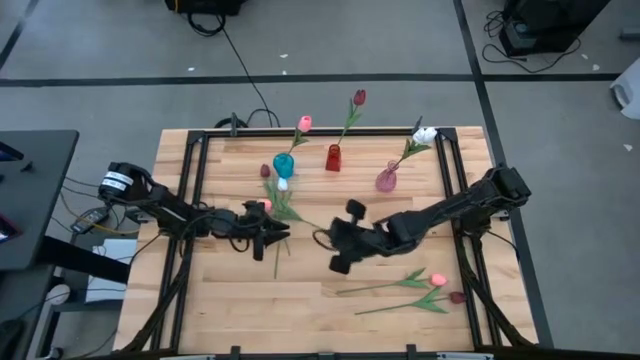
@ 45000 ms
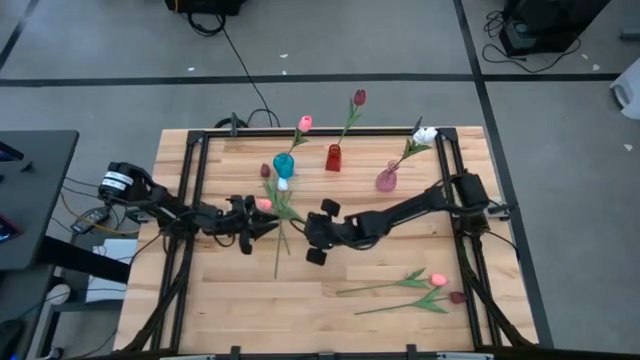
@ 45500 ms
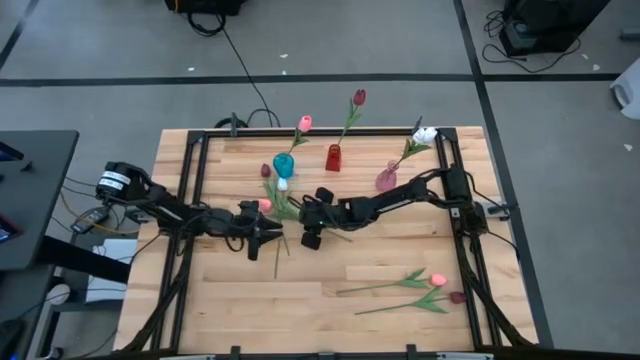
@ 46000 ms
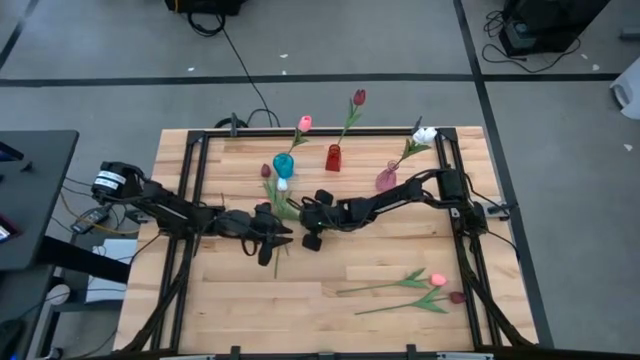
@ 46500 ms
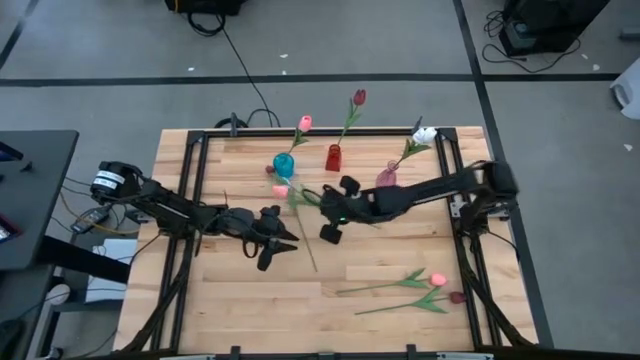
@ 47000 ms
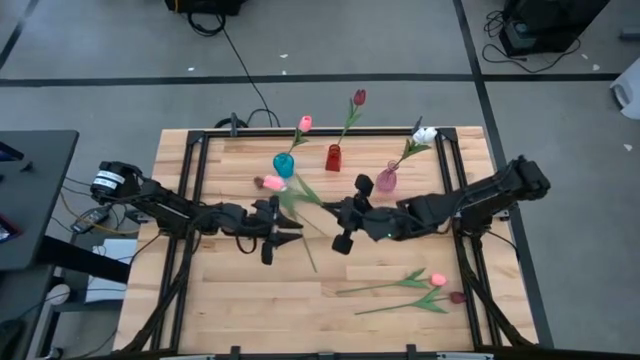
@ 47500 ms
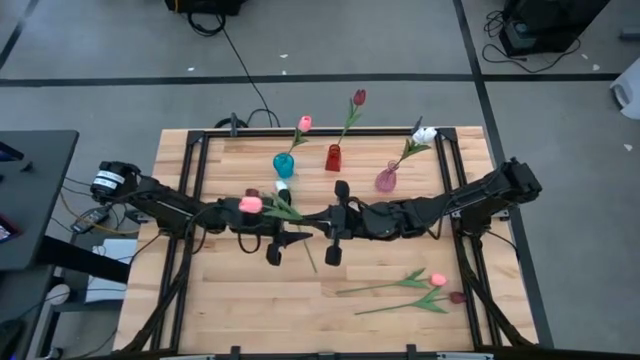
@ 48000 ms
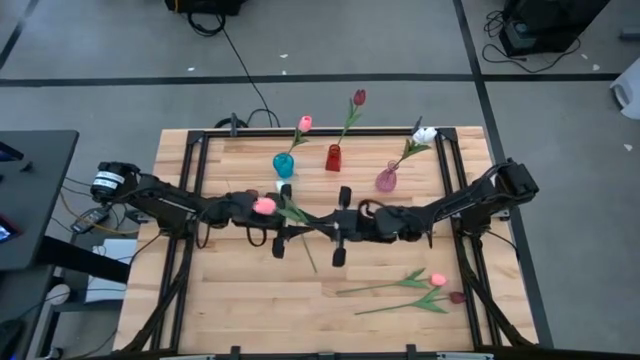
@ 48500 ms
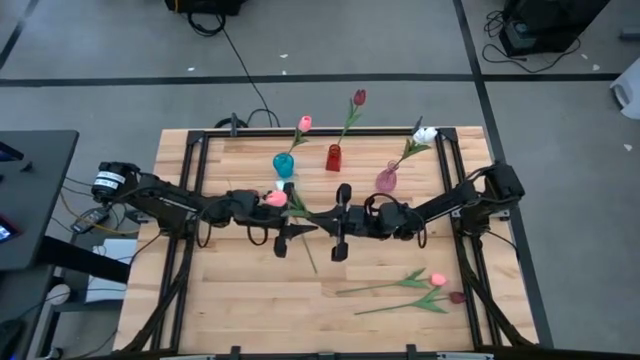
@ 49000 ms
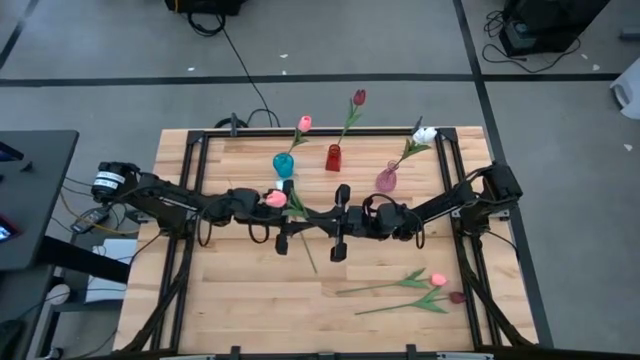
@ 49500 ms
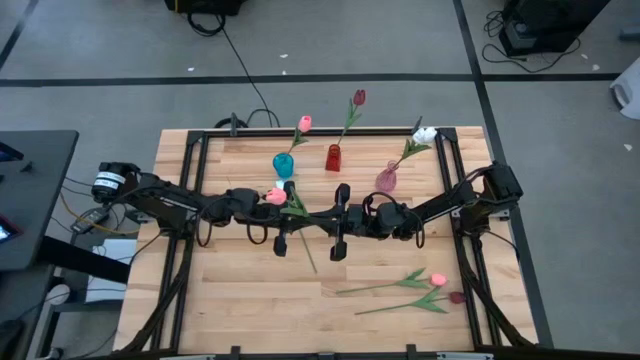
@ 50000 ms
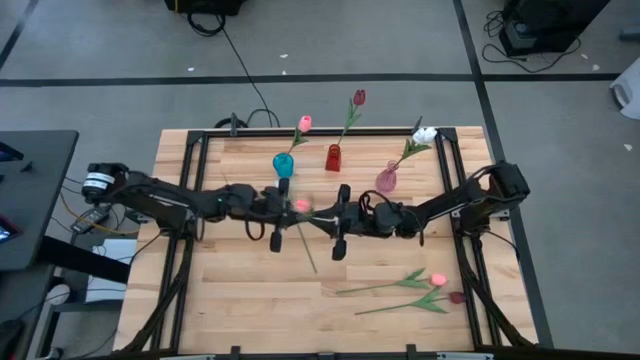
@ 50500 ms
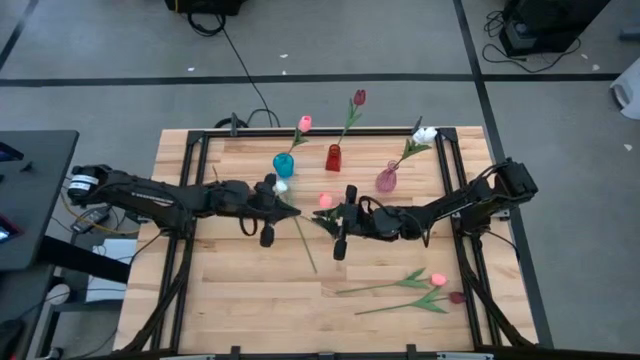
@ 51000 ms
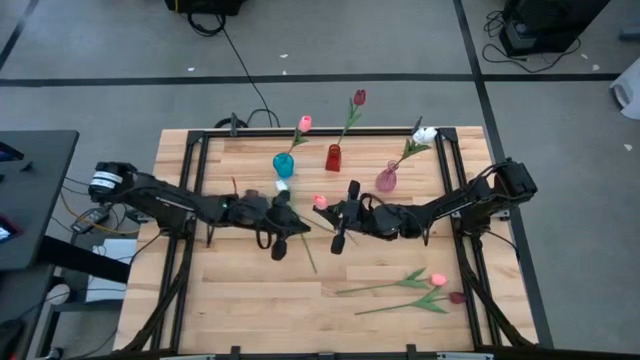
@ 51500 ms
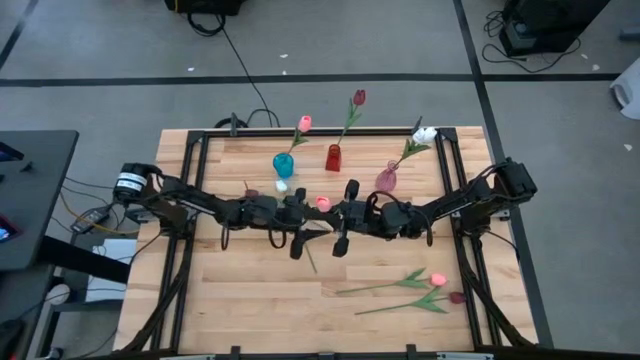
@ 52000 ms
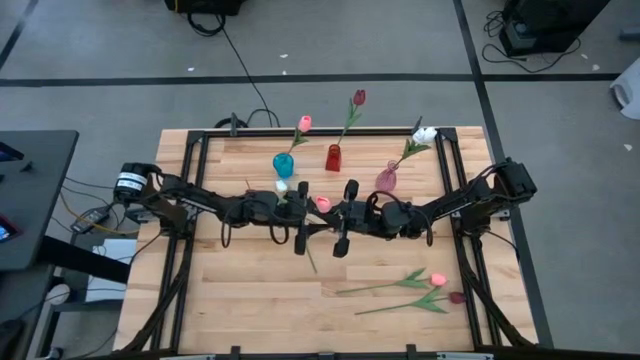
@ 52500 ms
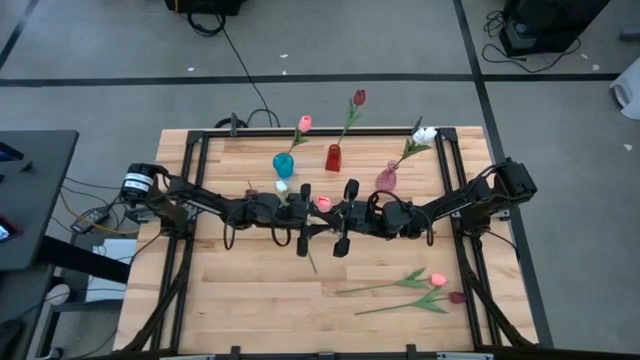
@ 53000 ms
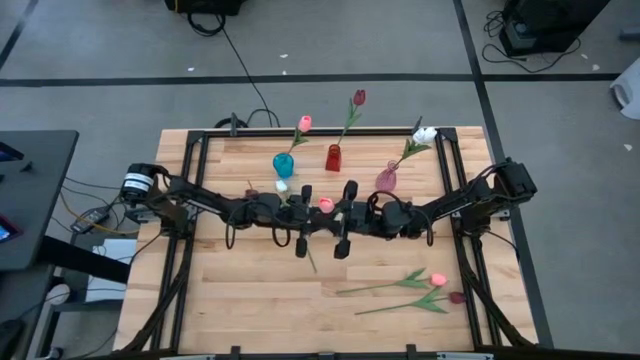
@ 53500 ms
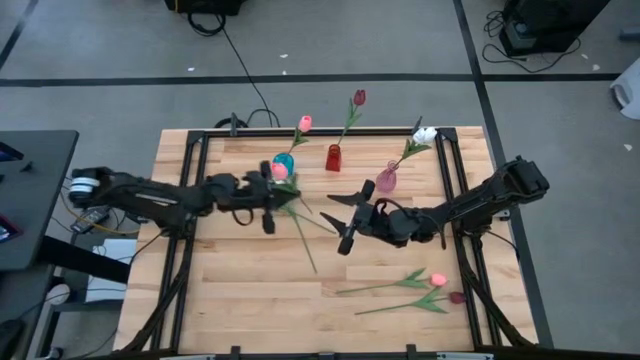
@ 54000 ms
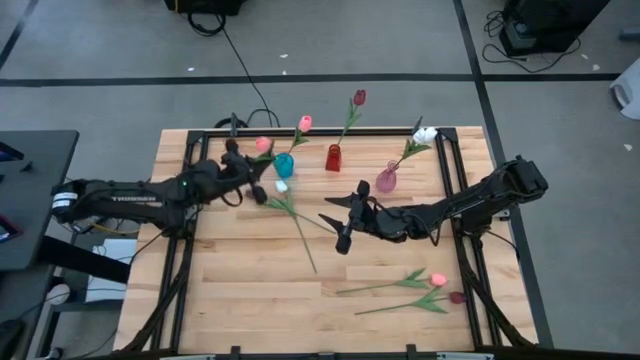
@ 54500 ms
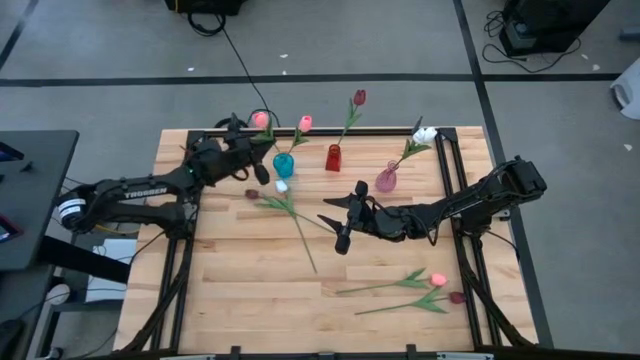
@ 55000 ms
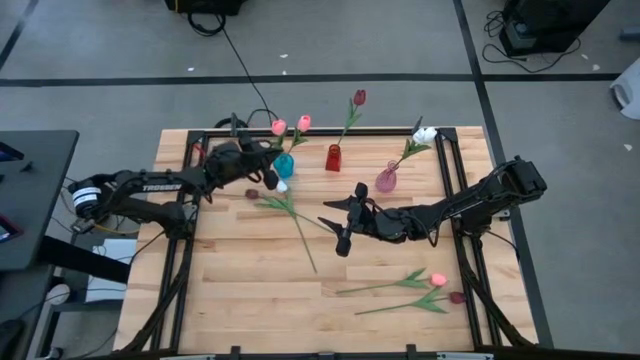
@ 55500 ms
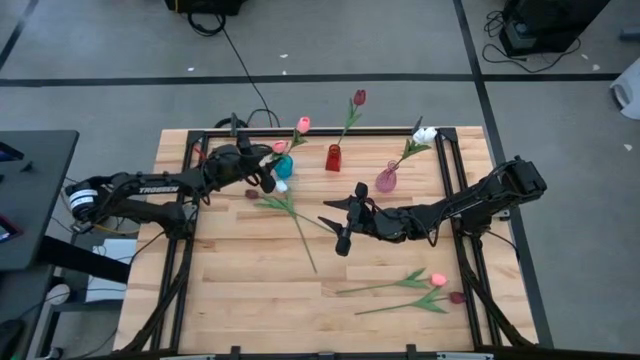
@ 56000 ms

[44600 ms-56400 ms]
Task: Sort flowers into vase by color
Put the top pink tulip into the blue vase

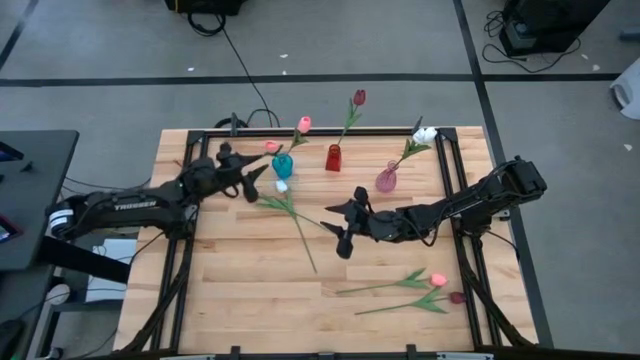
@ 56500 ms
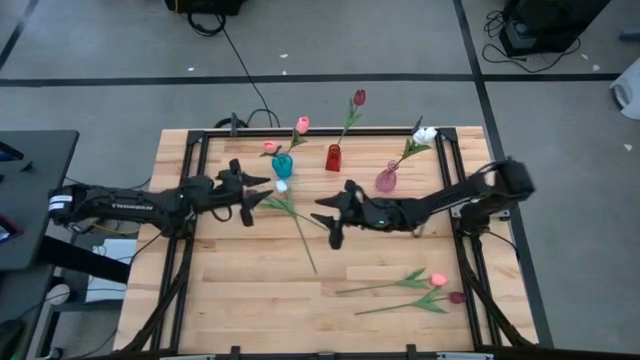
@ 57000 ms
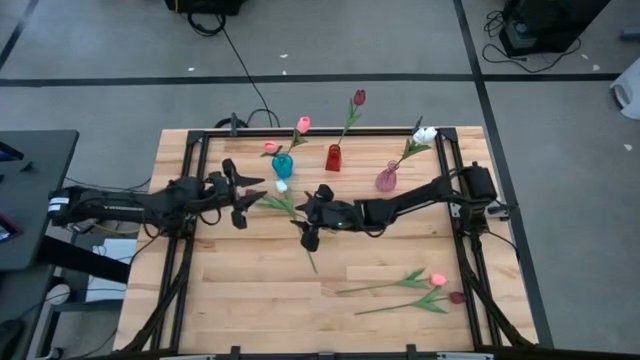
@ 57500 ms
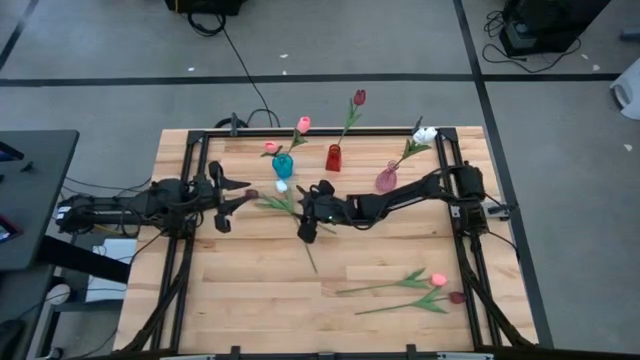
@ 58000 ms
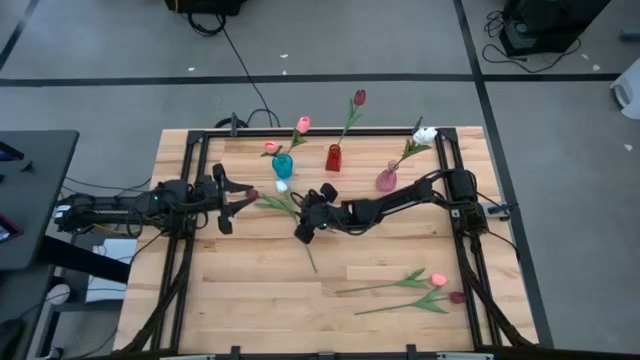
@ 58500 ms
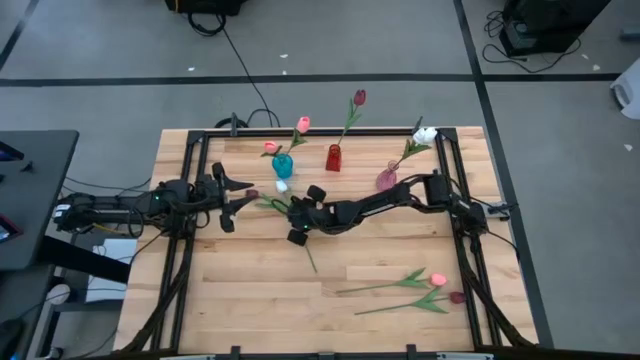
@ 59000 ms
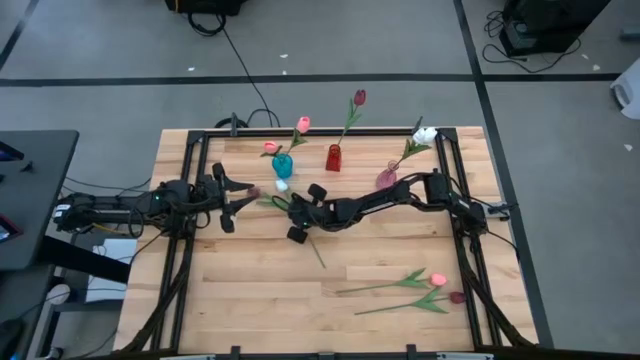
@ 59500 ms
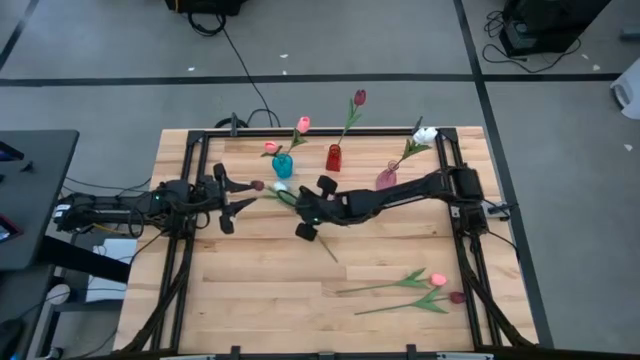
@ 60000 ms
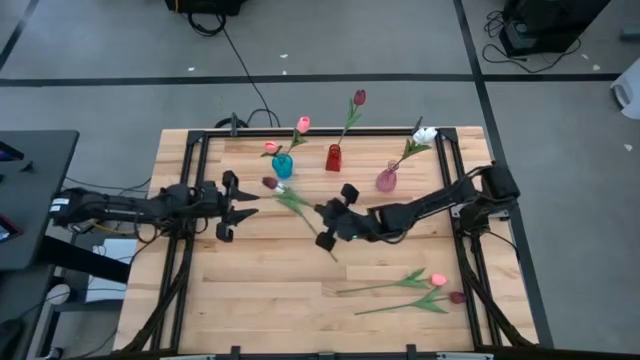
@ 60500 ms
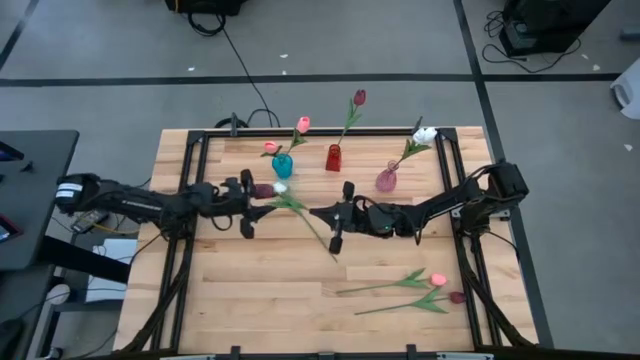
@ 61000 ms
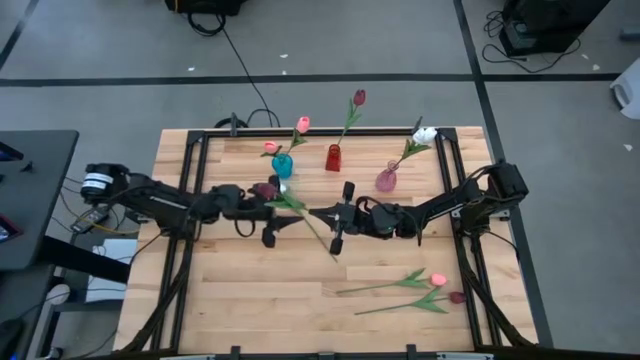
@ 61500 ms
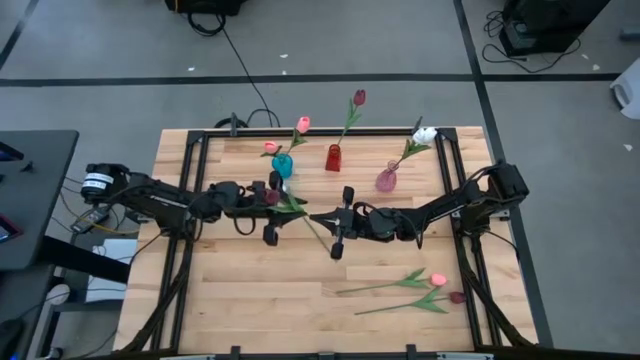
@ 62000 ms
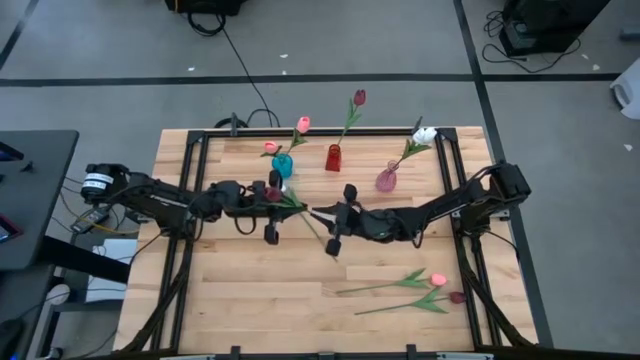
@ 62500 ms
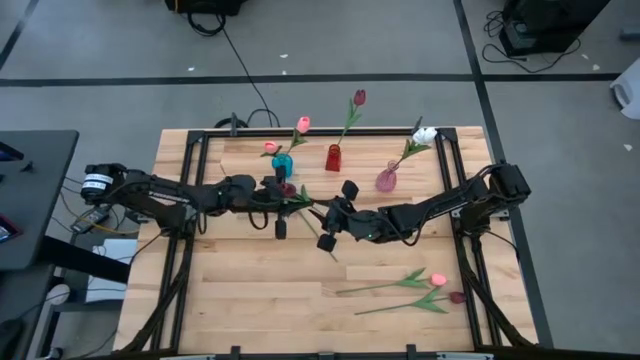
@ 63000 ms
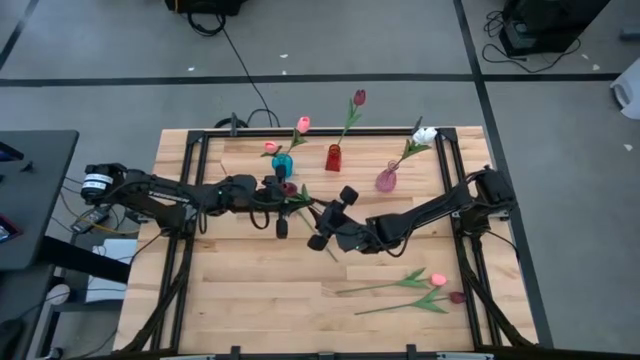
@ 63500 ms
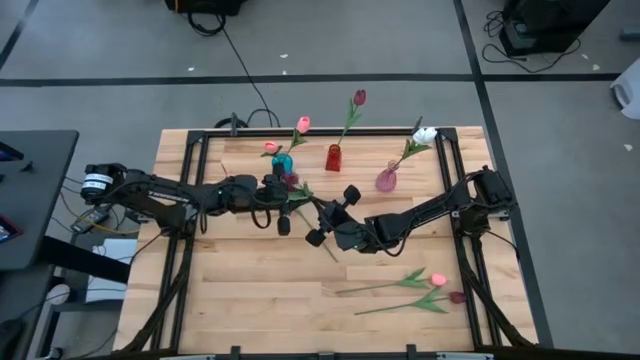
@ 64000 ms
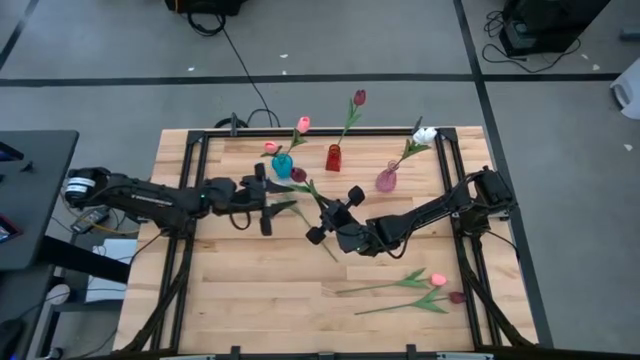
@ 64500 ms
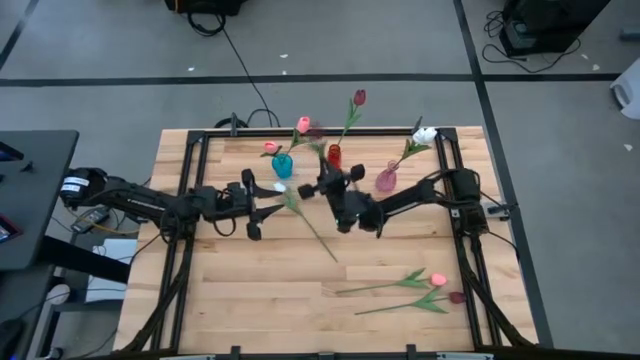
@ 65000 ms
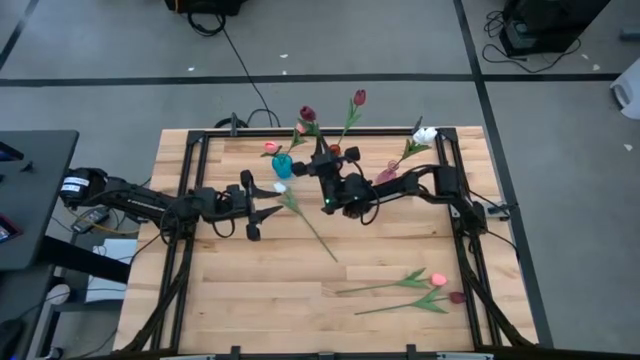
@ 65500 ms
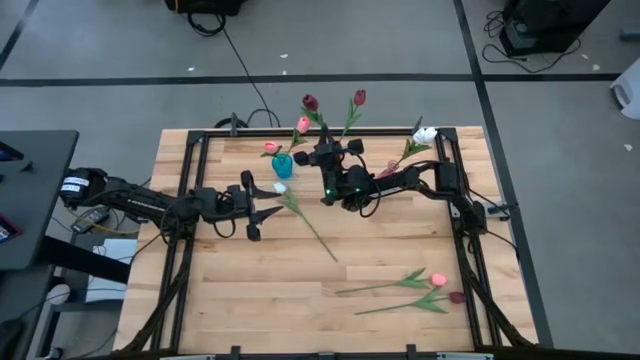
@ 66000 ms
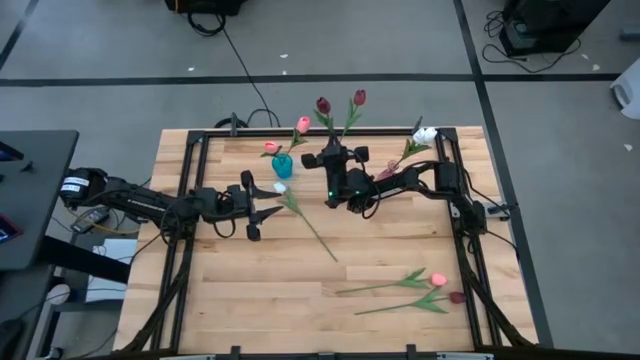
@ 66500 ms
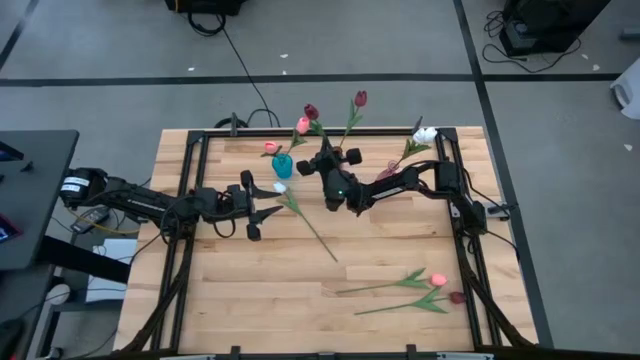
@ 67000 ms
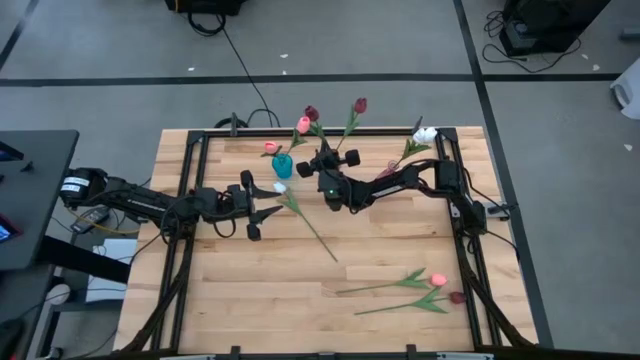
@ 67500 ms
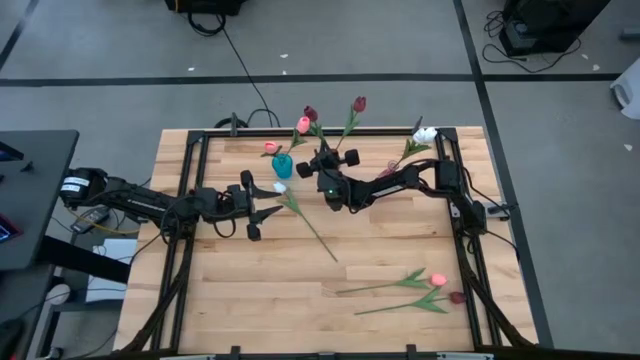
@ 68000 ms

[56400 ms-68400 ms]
Put the top red tulip into the red vase
